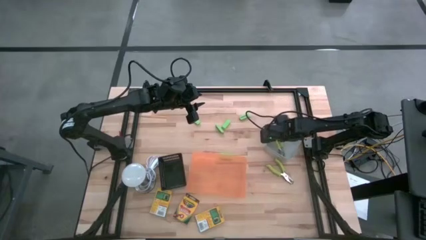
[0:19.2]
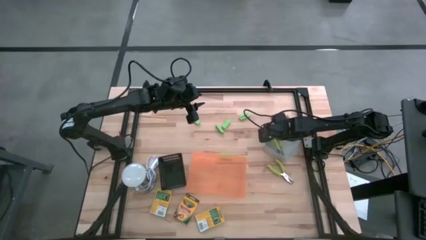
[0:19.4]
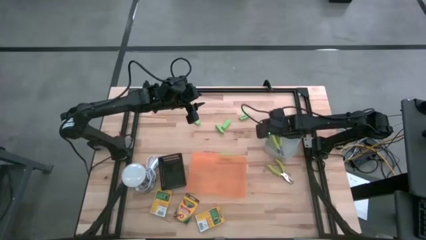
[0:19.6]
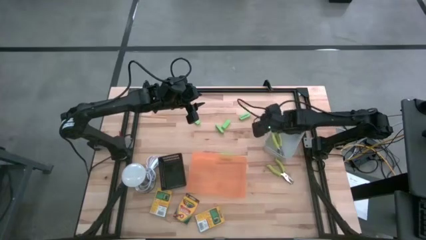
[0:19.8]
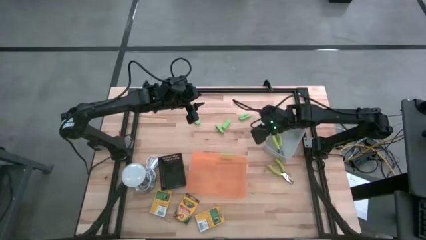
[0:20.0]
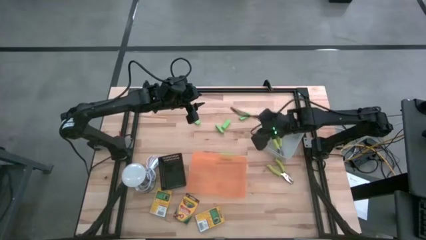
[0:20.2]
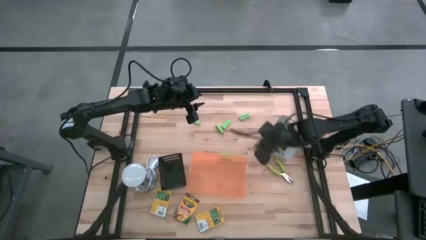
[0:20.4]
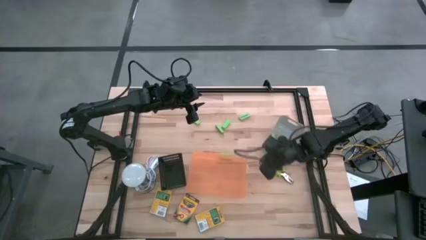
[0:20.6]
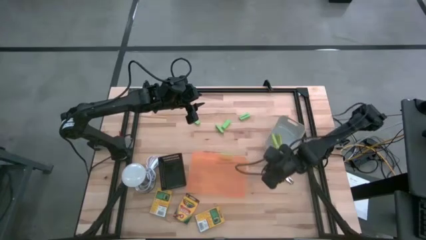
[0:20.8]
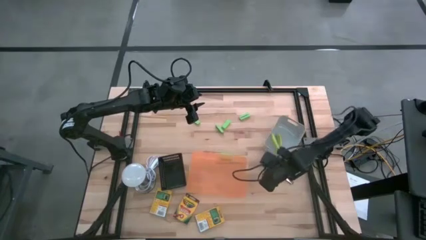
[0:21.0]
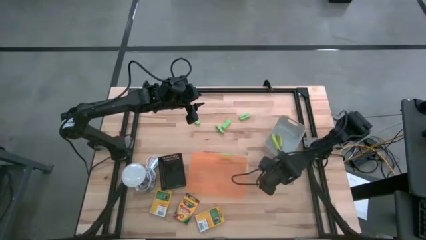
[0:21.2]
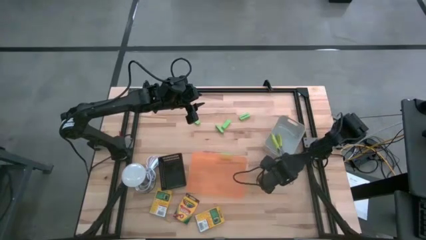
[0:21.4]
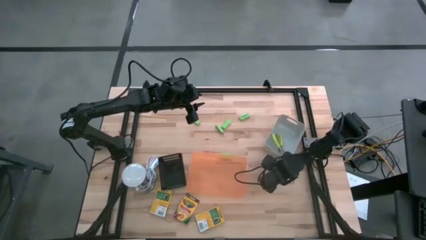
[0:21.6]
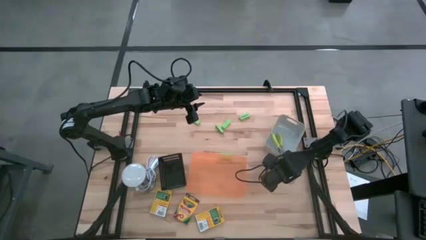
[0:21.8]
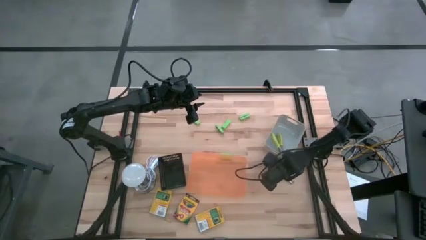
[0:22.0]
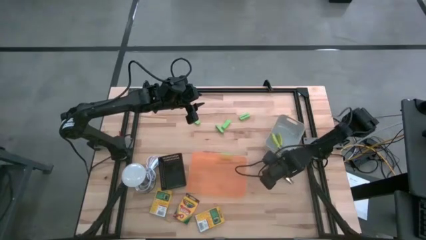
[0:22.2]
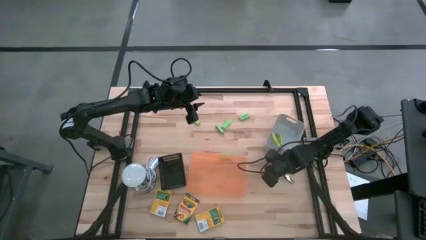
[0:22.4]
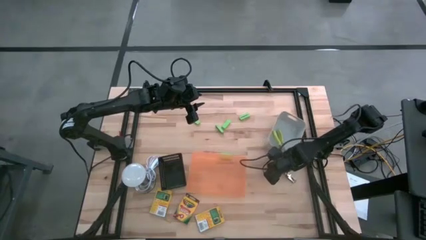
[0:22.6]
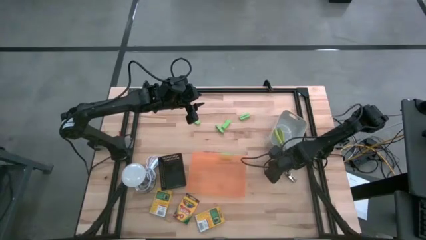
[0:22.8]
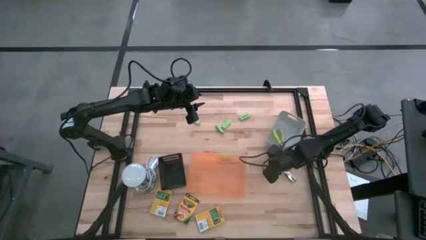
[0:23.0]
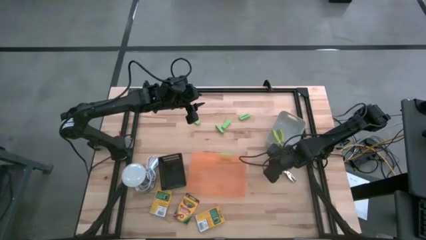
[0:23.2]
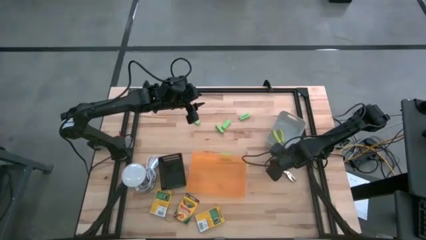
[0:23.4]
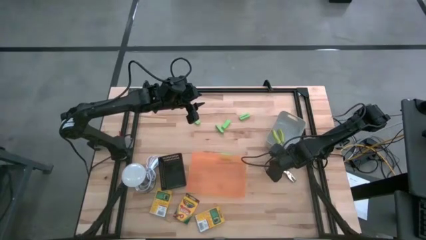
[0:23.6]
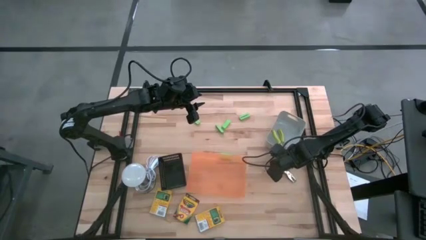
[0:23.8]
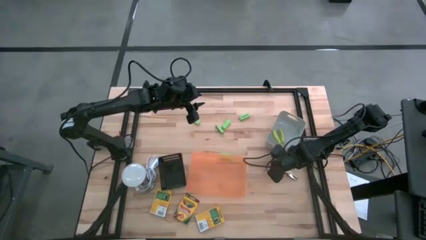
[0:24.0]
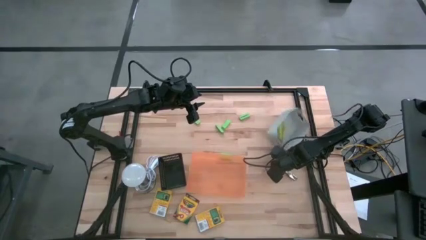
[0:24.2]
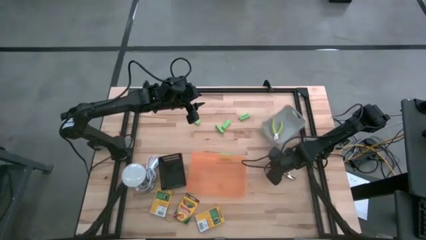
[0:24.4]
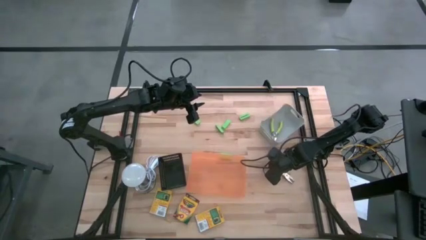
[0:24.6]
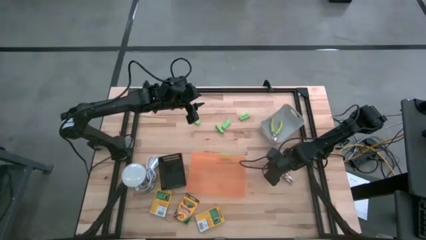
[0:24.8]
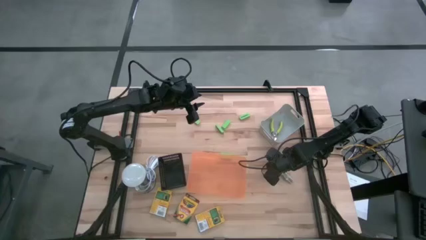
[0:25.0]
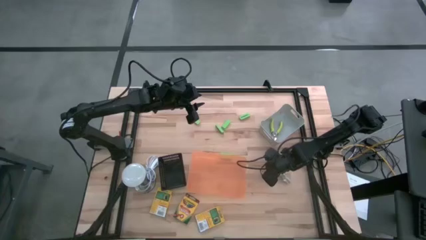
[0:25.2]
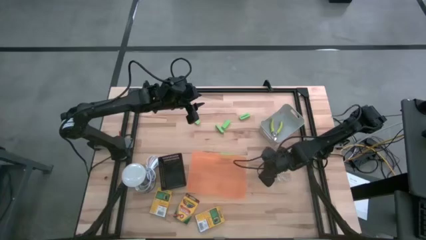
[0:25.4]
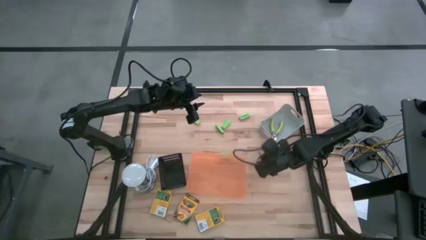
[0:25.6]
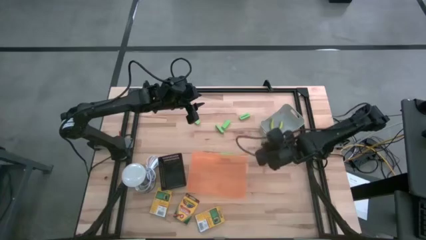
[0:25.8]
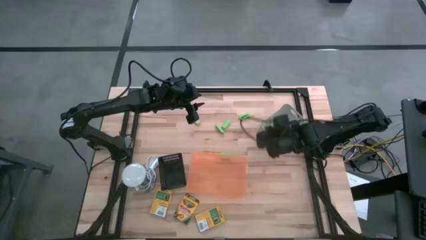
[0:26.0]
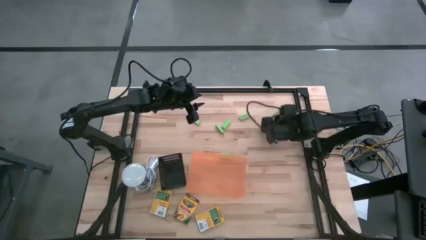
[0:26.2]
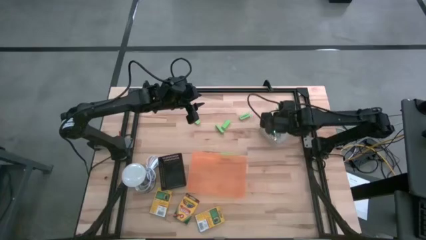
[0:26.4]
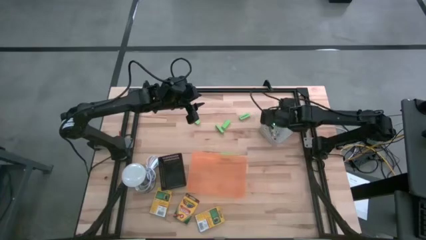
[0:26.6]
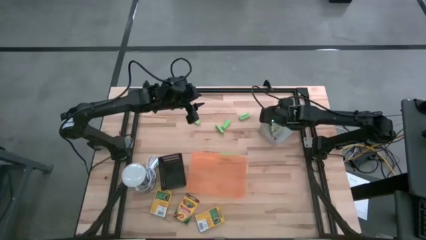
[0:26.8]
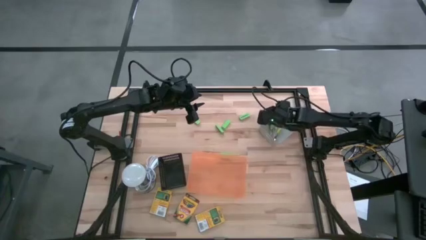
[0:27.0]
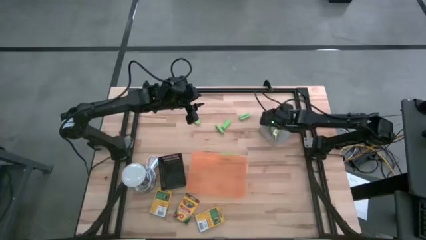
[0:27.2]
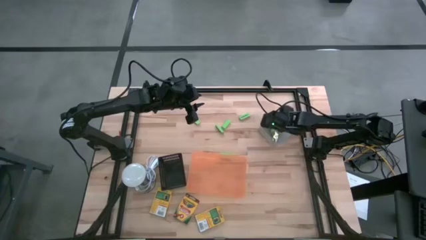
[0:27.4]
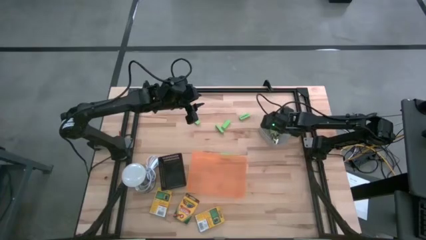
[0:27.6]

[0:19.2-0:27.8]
Task: Pick & Place School Supplies
Put the green hole puncher into the gray bin

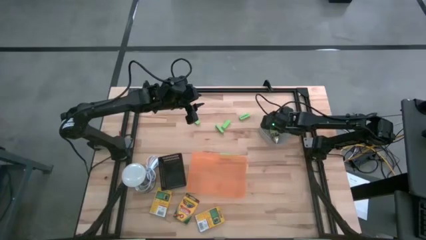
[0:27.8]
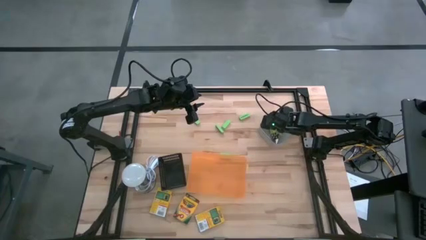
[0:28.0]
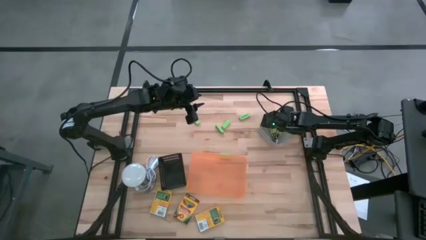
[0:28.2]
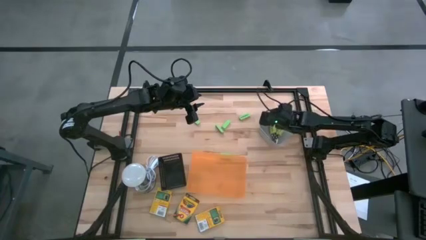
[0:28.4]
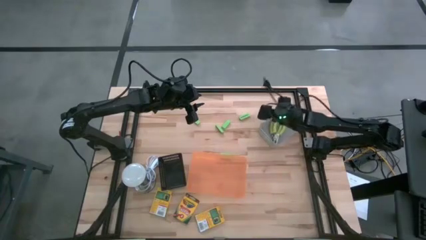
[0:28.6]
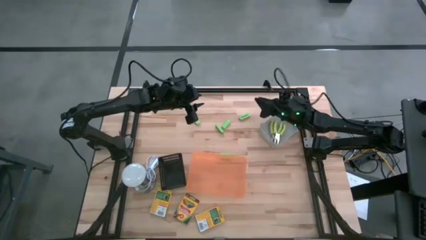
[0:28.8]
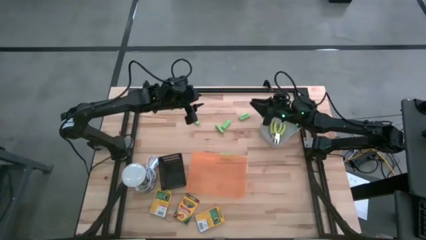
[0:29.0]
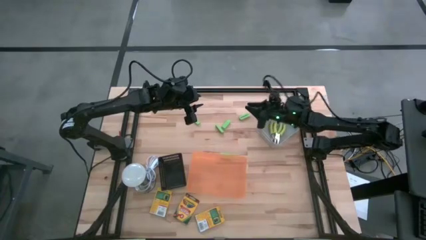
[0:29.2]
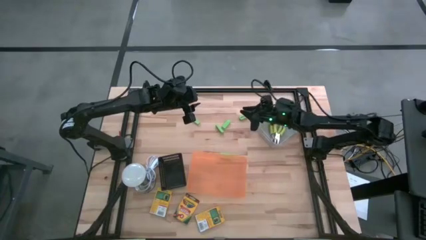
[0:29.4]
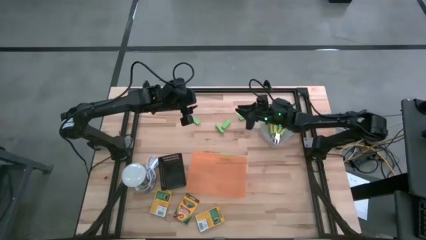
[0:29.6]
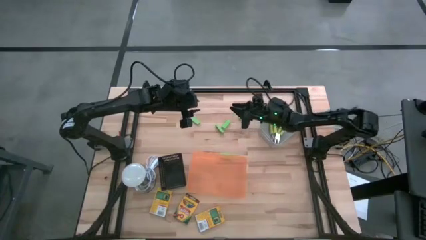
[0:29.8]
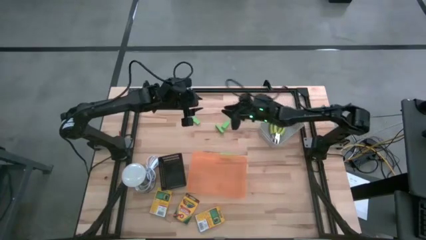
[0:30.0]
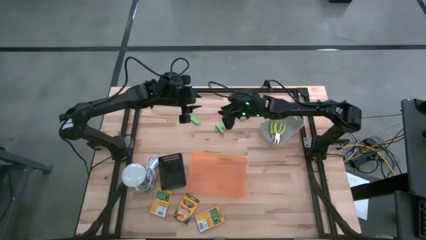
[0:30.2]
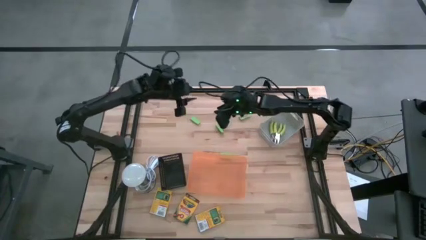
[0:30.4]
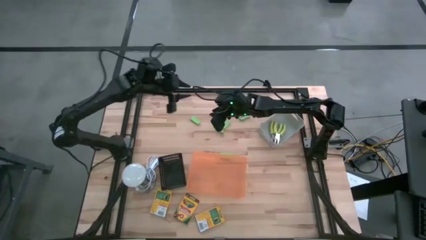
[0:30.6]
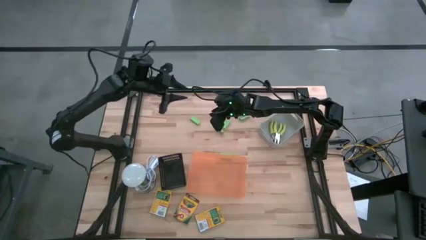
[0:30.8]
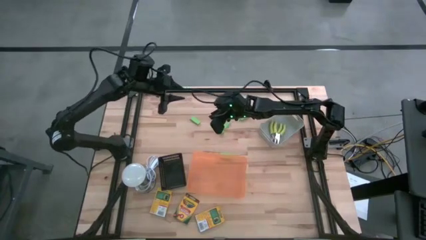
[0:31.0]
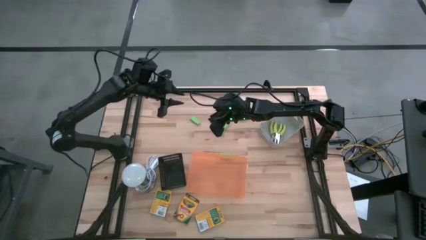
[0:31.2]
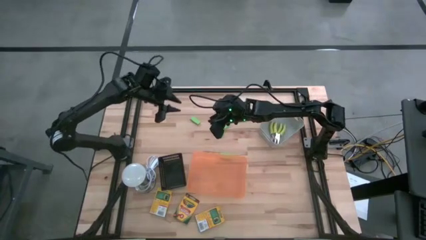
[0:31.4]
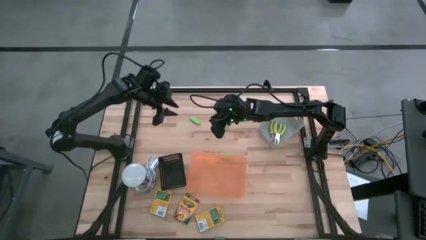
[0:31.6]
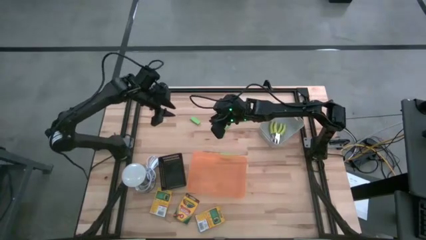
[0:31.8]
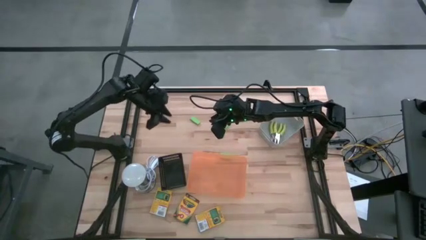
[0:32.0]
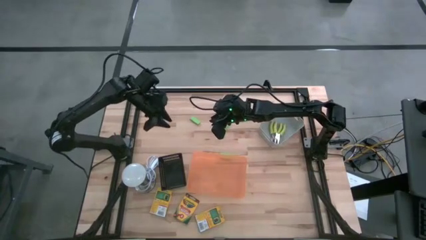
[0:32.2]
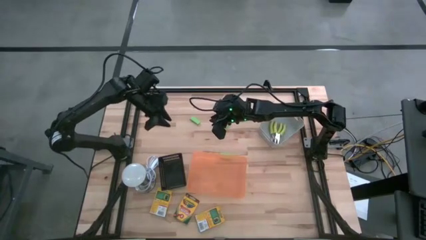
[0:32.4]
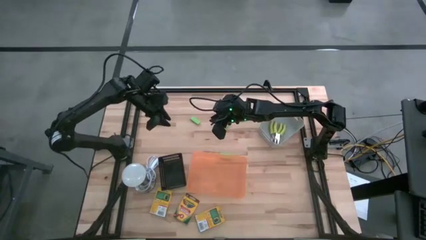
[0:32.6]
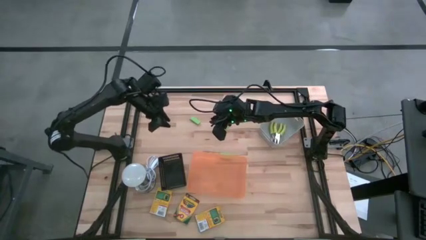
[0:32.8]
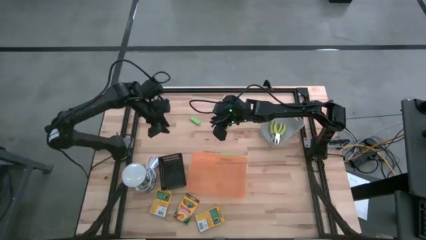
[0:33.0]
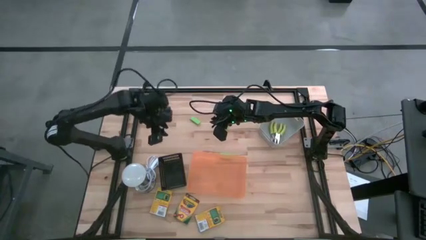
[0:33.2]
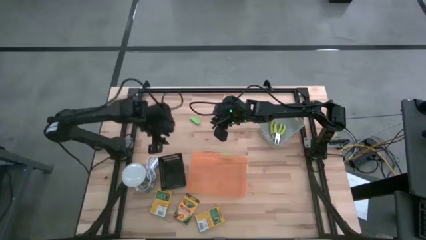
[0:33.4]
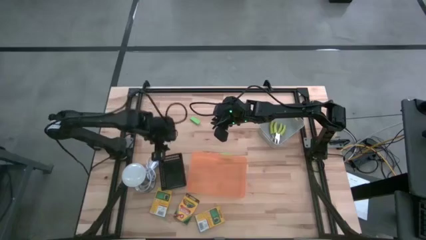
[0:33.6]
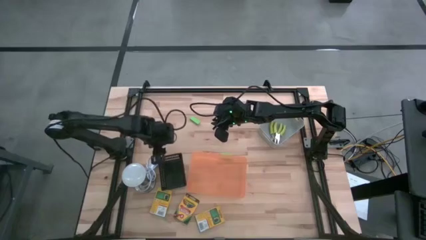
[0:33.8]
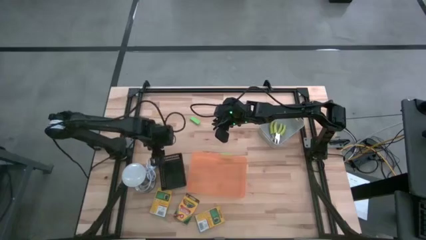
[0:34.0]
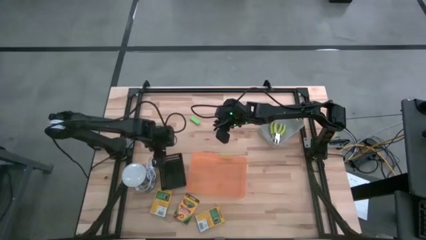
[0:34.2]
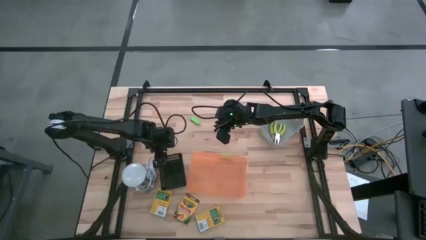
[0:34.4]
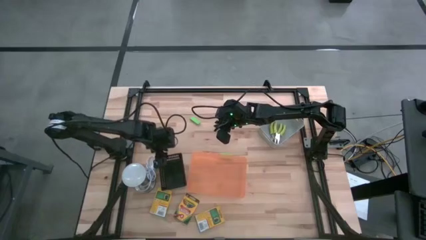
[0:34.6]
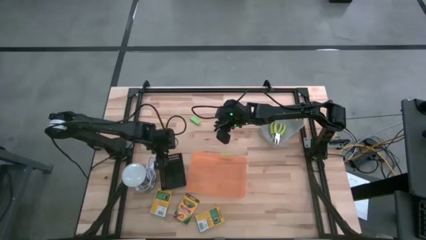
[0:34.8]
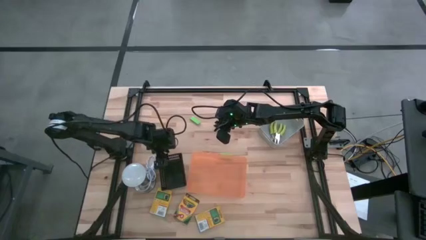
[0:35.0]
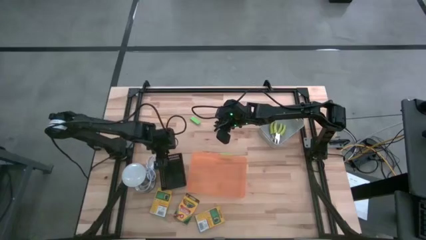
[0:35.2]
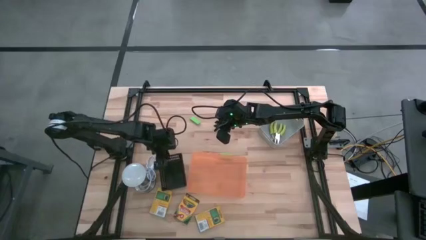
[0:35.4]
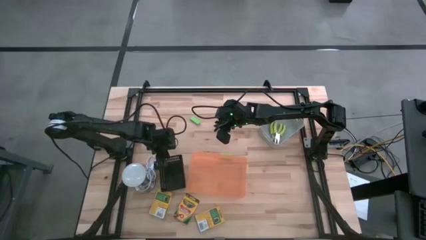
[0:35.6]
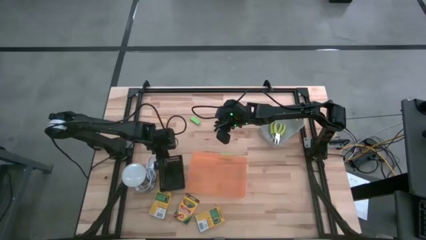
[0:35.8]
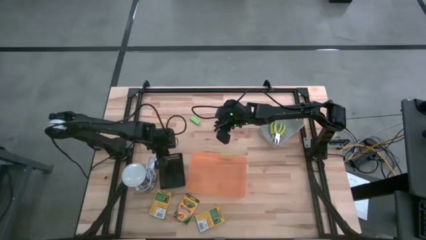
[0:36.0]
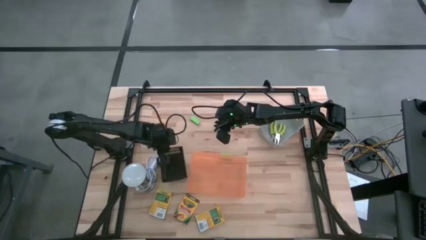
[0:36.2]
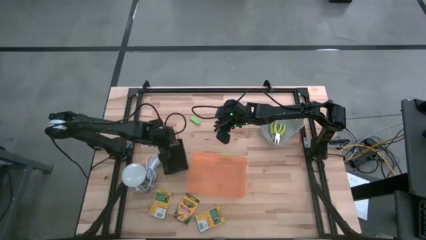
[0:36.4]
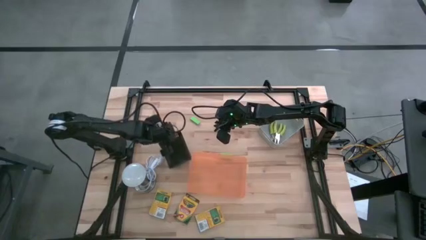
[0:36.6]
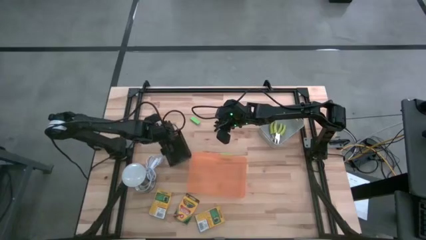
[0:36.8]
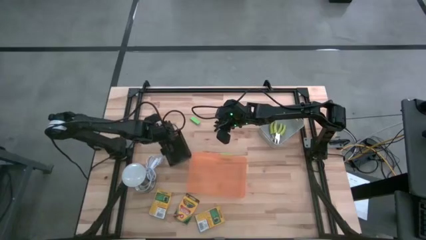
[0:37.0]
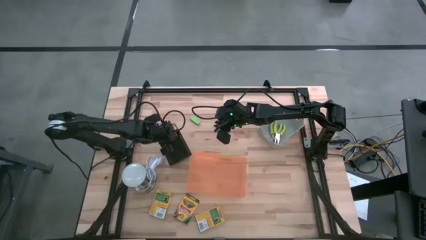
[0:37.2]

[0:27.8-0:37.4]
Adjust the black bin on the table
